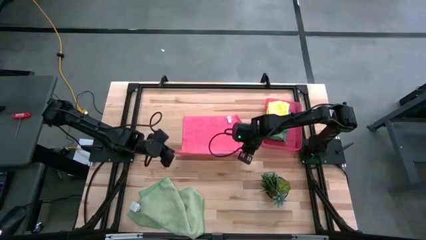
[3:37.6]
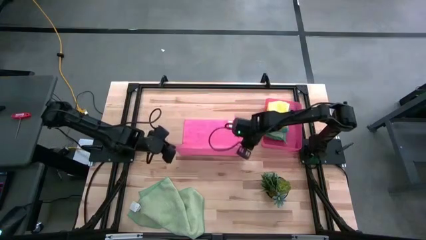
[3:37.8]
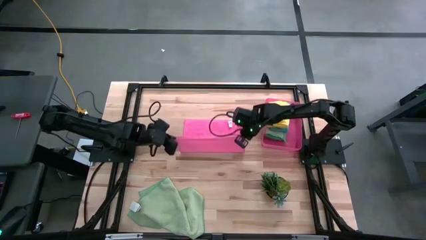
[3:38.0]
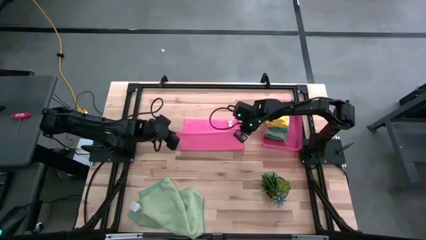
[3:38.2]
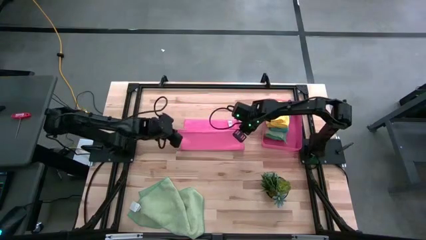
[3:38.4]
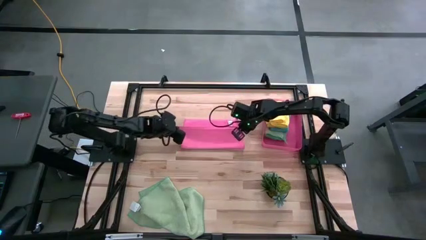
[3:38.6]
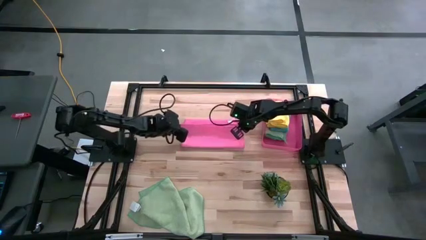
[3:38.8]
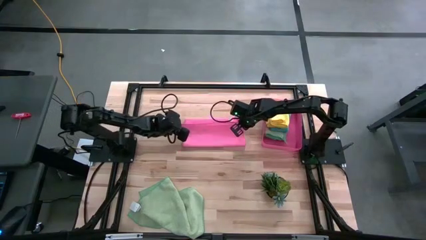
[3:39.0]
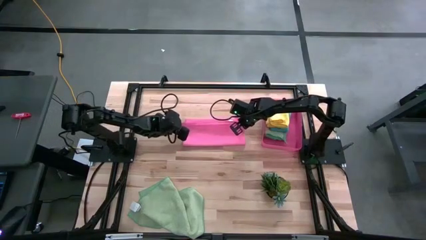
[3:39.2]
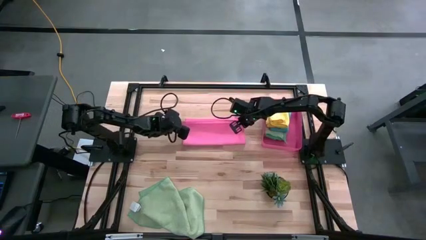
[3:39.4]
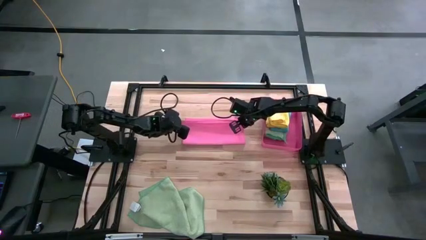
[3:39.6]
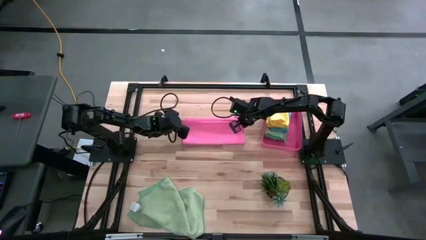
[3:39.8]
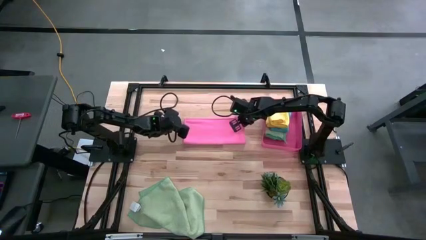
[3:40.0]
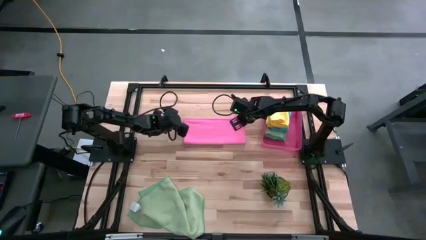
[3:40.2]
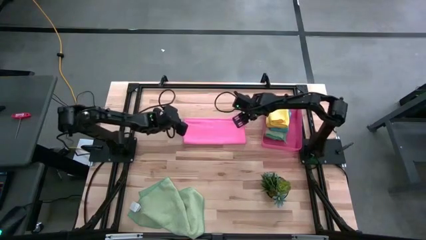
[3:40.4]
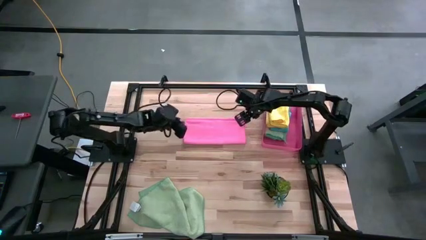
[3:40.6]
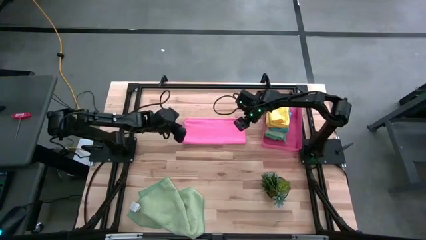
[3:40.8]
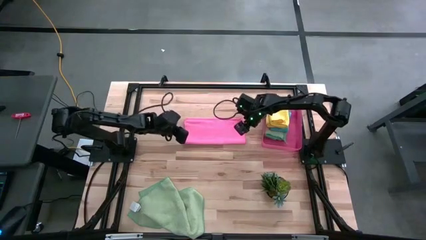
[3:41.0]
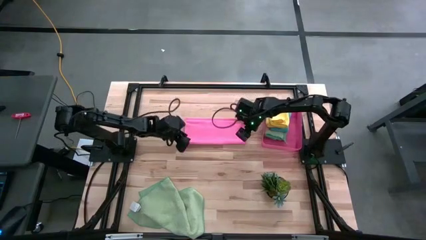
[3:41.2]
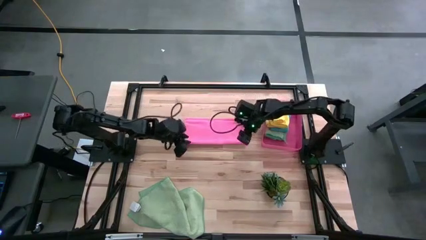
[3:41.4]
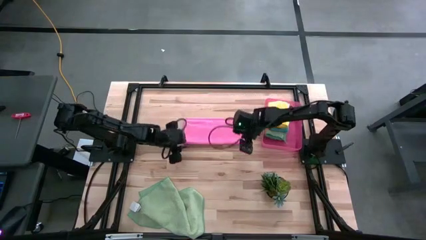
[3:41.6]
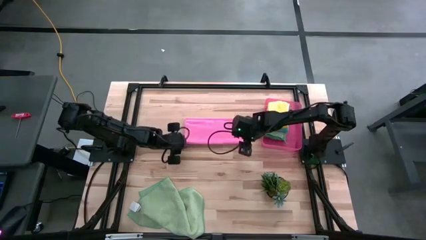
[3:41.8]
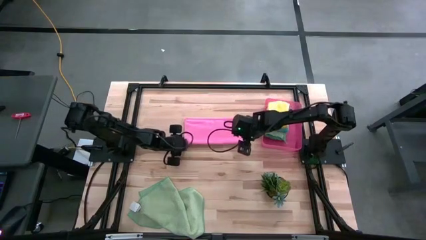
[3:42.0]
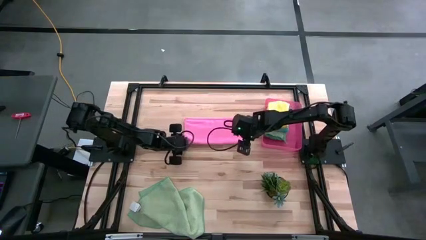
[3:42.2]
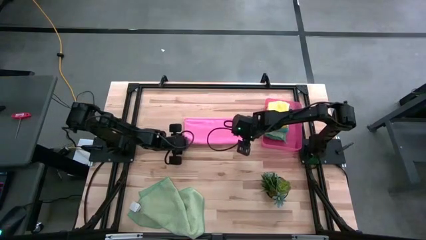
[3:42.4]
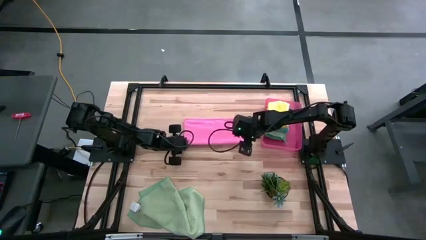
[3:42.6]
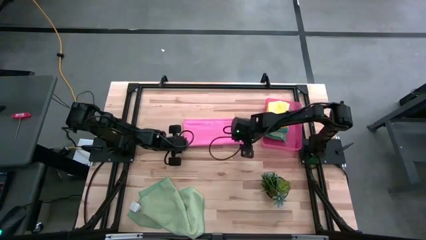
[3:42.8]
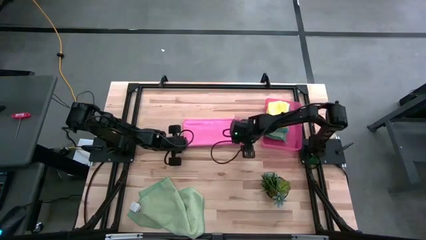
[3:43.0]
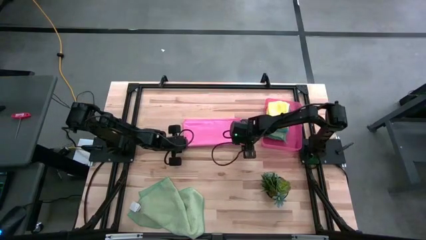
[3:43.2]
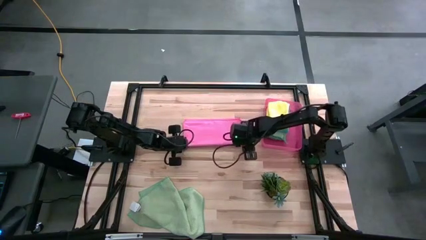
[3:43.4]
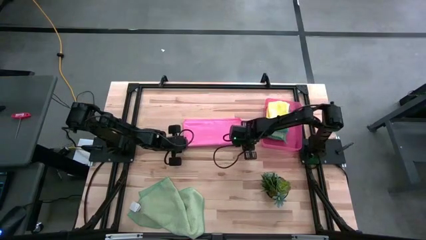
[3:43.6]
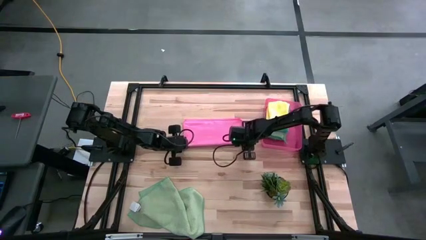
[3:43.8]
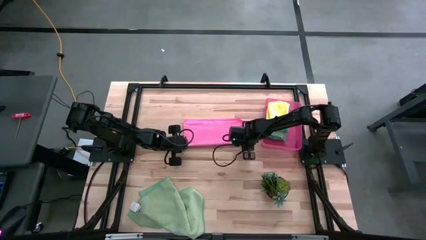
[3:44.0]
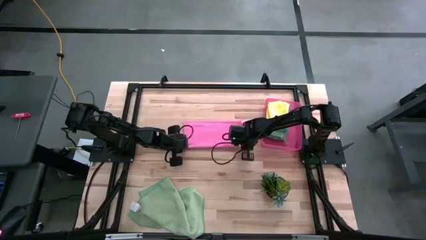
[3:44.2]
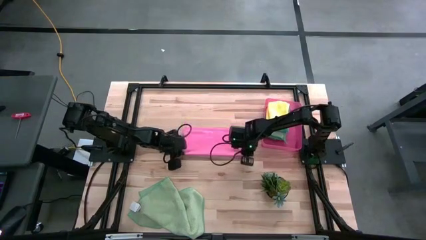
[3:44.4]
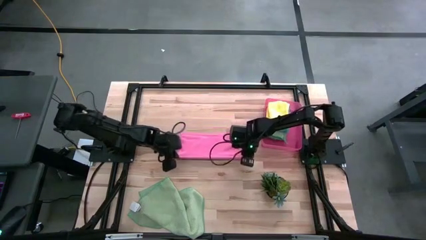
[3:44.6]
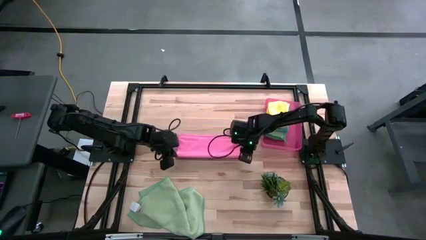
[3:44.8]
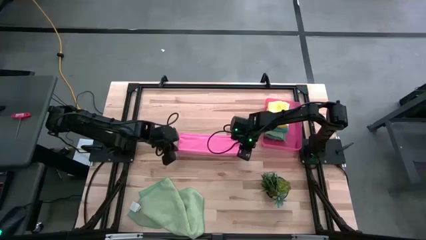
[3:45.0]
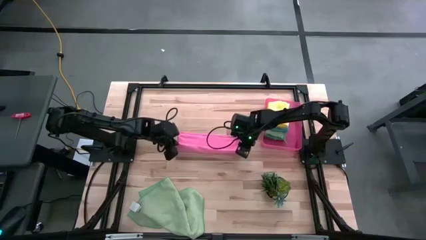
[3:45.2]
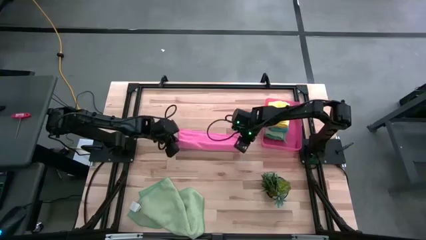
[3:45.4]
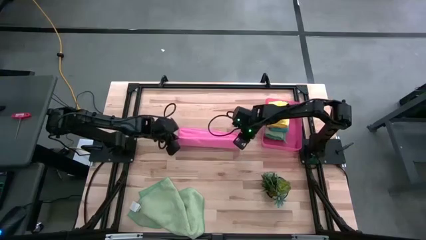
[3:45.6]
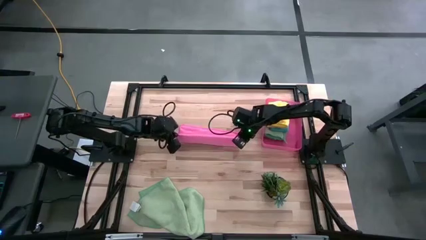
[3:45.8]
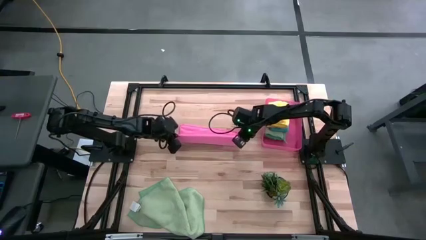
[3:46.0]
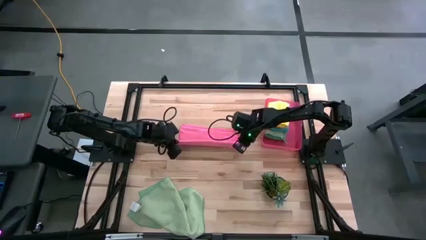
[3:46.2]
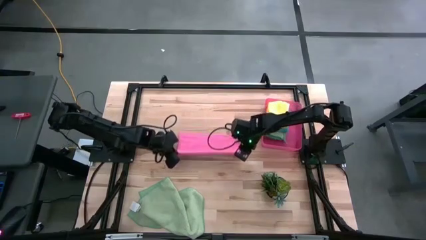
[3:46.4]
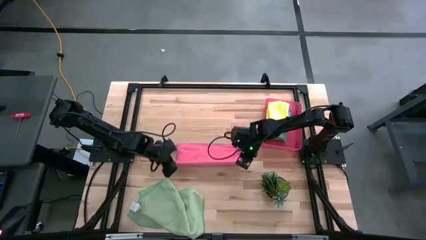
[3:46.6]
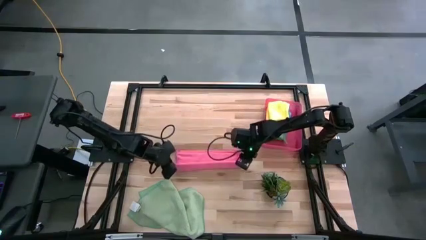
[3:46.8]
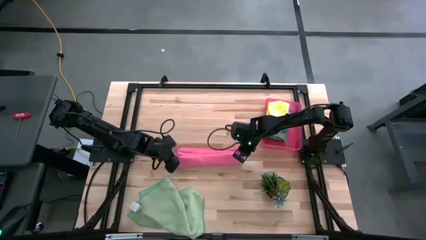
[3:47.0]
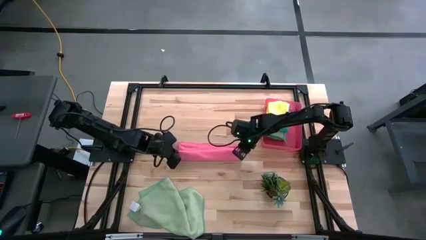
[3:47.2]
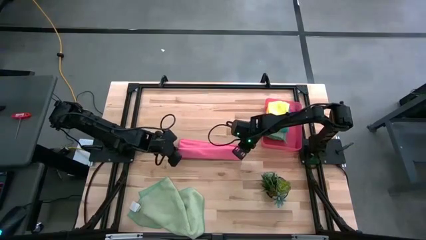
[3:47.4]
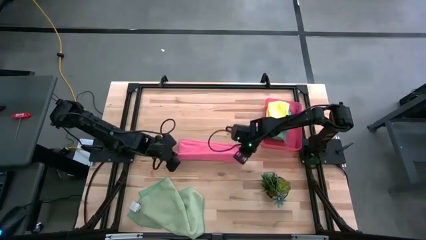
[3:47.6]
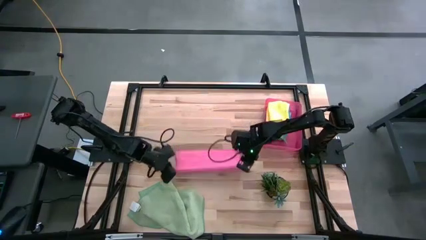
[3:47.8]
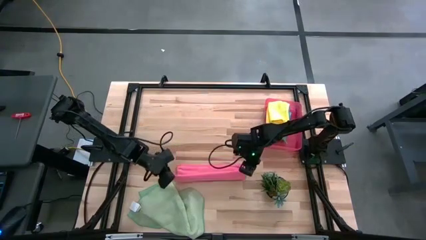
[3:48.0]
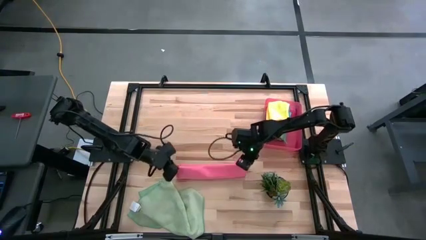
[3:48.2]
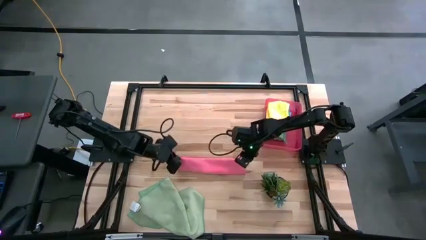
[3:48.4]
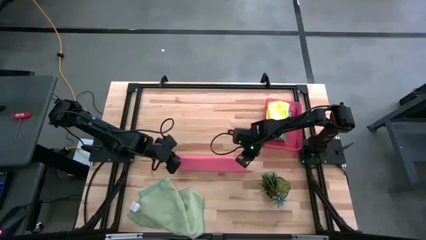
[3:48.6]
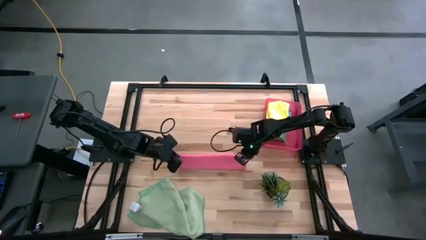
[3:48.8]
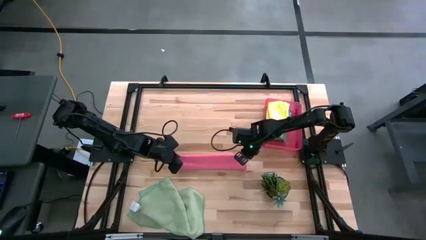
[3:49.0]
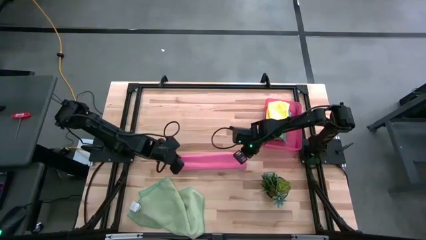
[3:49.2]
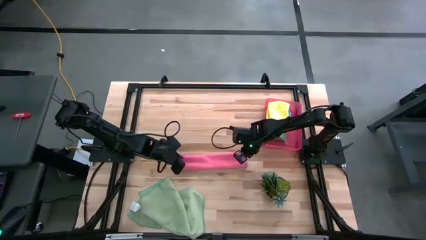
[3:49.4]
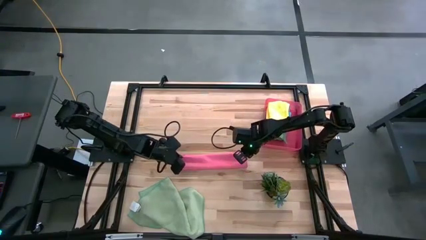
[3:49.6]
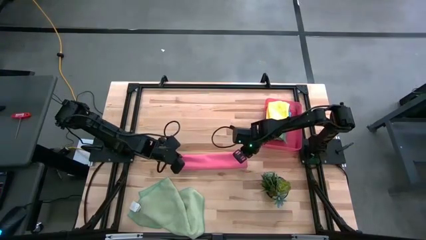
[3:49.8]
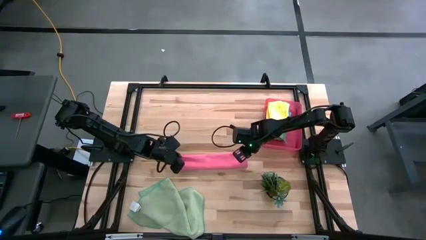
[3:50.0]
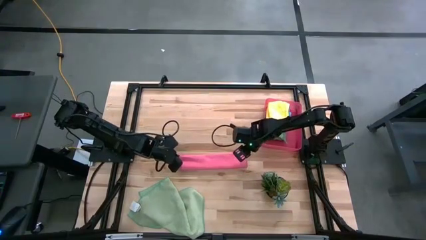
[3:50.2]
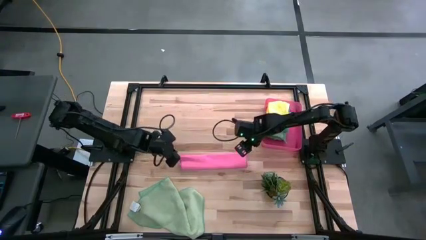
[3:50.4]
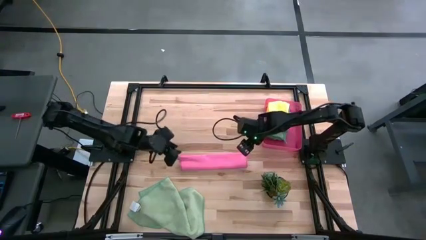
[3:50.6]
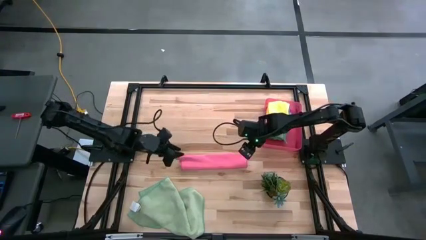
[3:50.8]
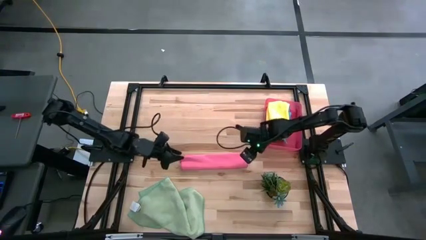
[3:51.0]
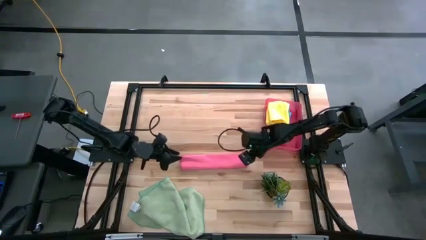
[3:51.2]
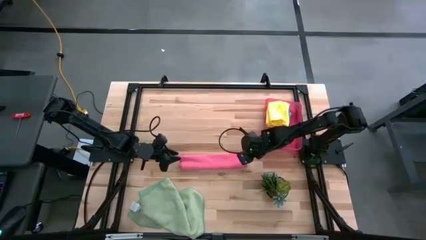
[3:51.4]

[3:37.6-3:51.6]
Task: Fold microfiber towels
Fold the pink microfiber cloth

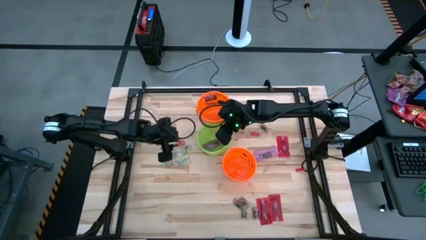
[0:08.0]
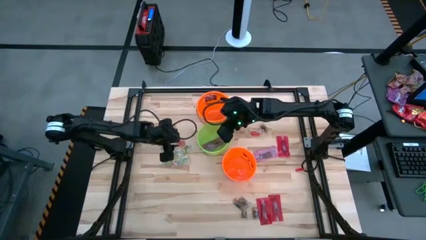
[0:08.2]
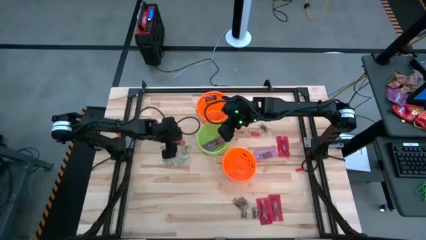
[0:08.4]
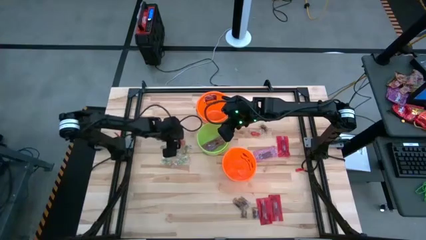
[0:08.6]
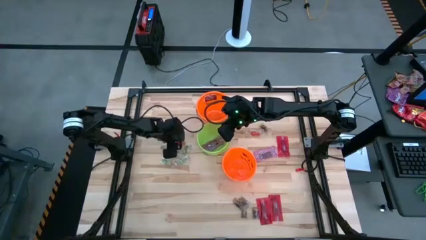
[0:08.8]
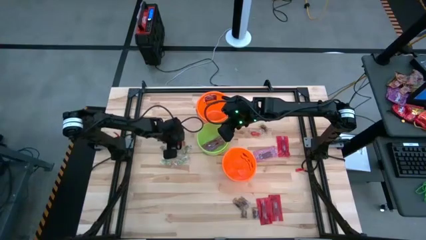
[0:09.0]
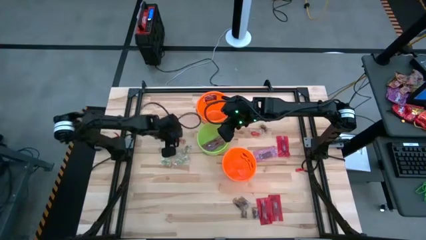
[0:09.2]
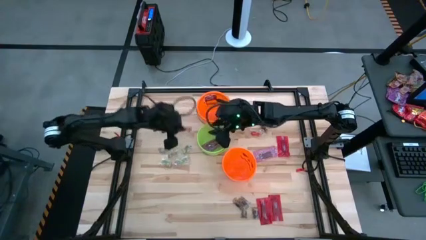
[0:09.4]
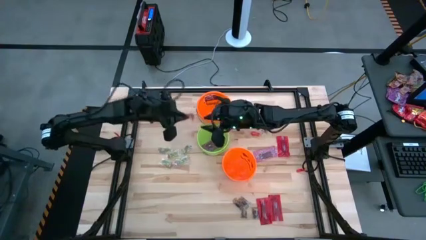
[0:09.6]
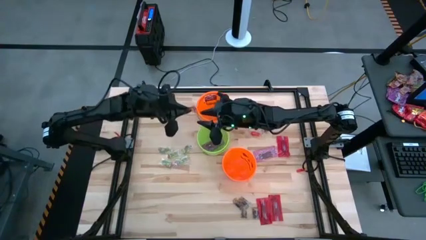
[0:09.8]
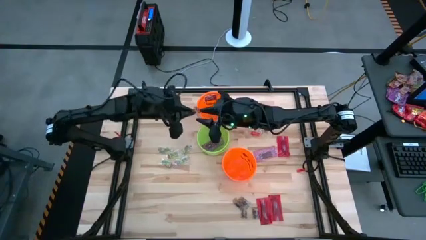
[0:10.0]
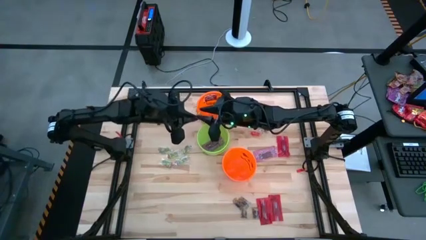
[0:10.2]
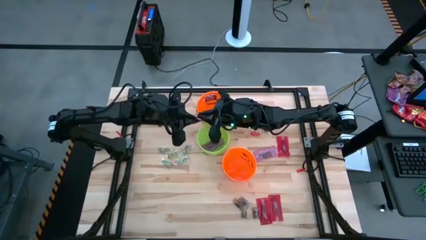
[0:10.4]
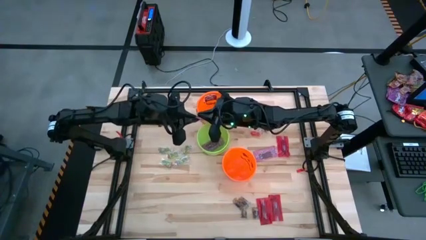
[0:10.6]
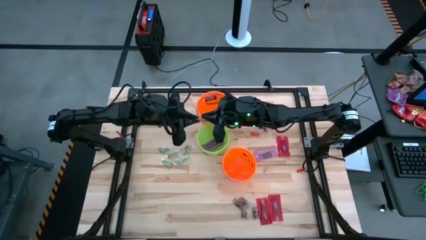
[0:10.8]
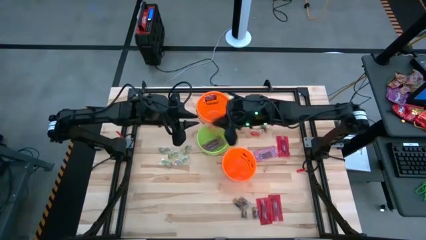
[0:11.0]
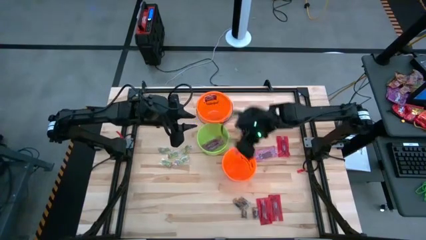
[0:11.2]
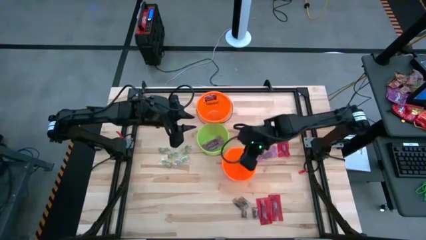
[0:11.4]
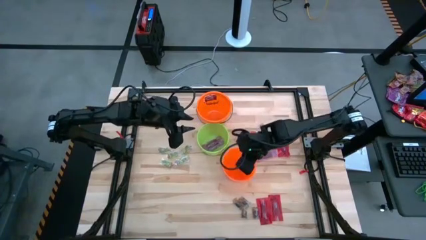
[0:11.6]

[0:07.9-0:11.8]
Task: Sort candy by brand, put in halloween buckets
Put the red gummy into the bottom orange bucket
